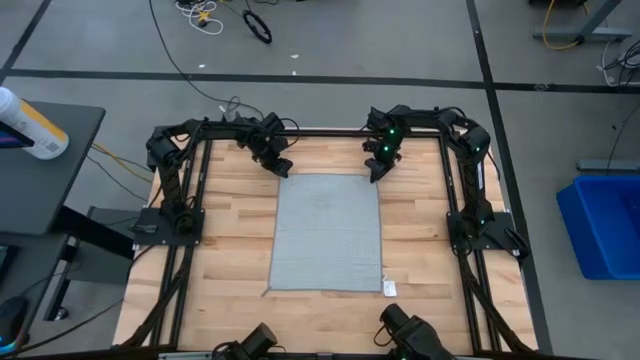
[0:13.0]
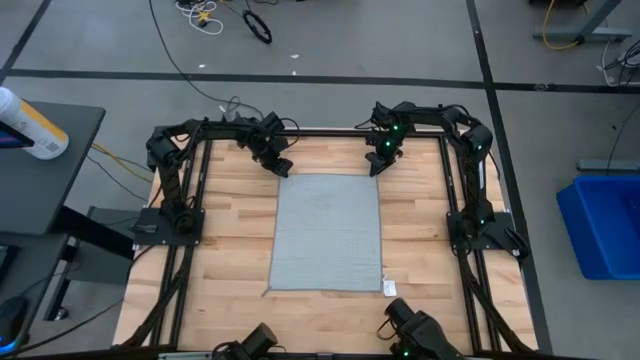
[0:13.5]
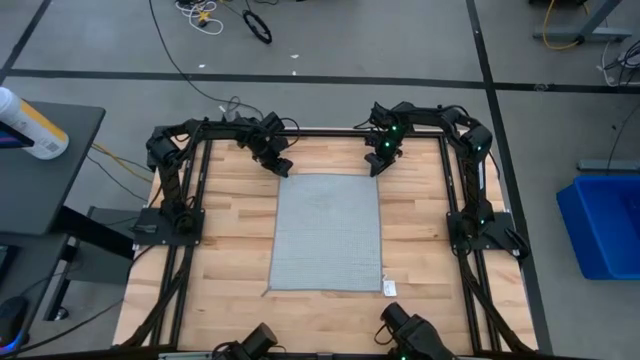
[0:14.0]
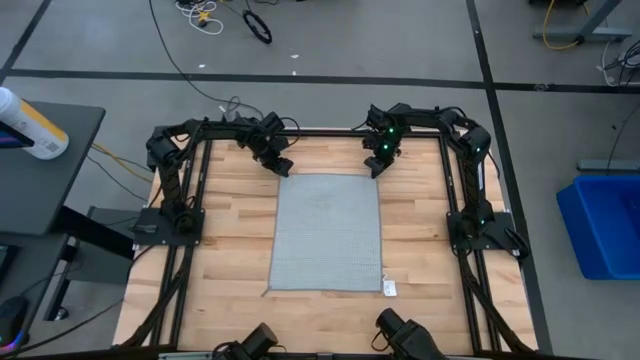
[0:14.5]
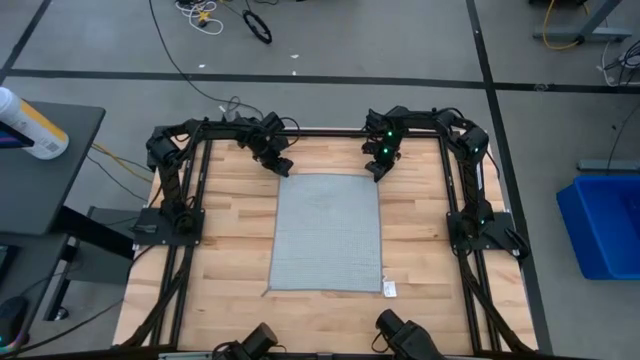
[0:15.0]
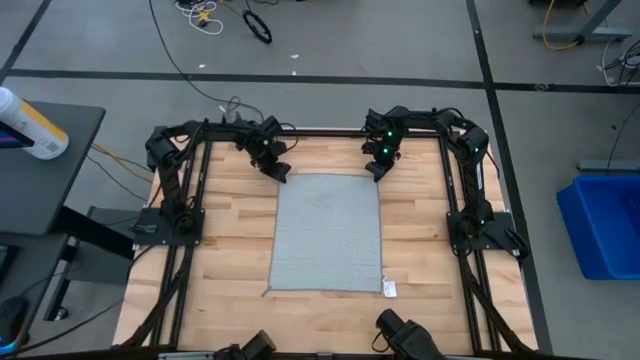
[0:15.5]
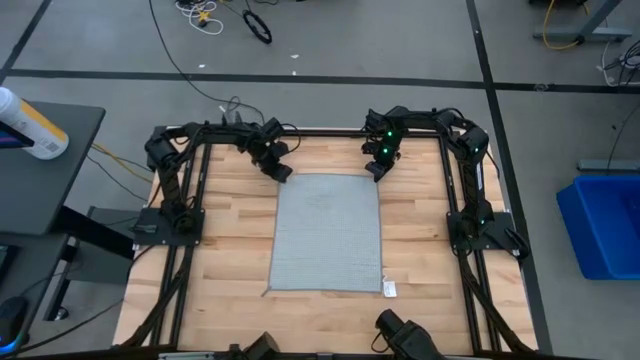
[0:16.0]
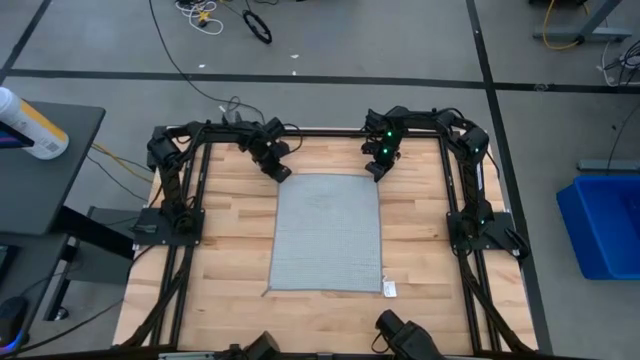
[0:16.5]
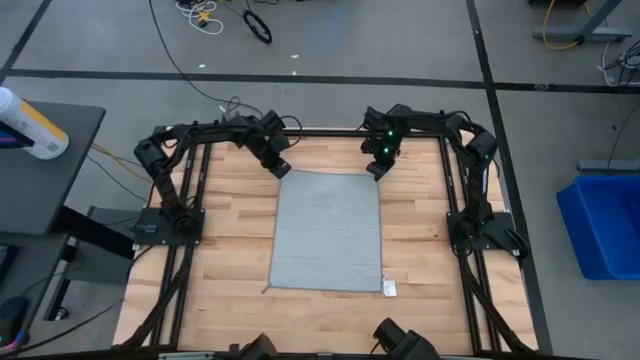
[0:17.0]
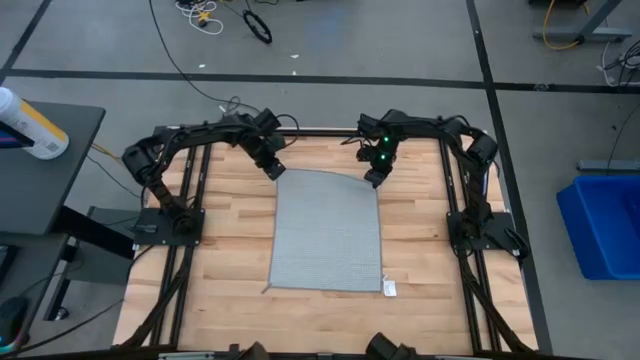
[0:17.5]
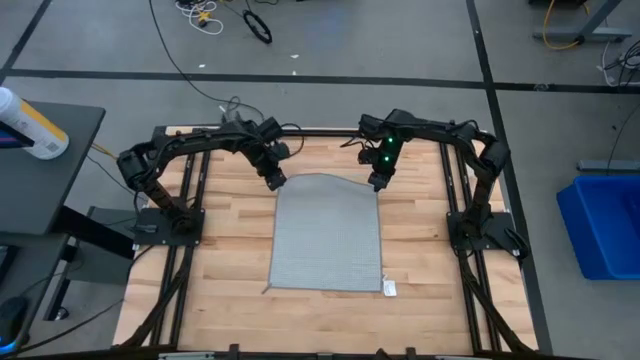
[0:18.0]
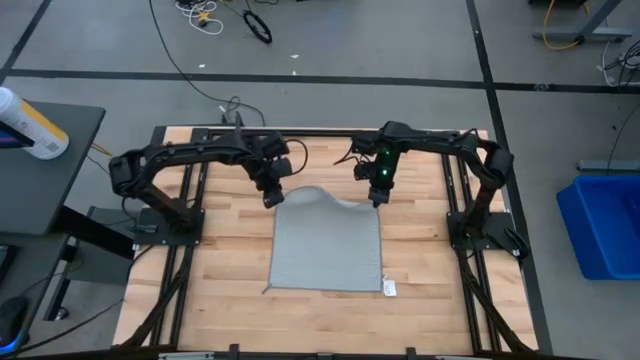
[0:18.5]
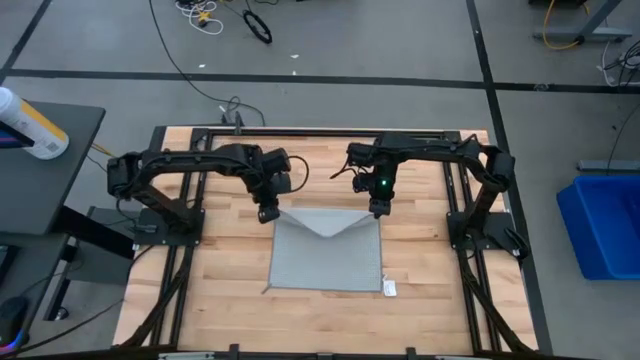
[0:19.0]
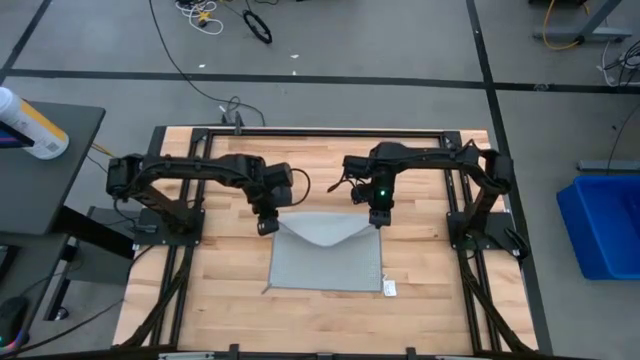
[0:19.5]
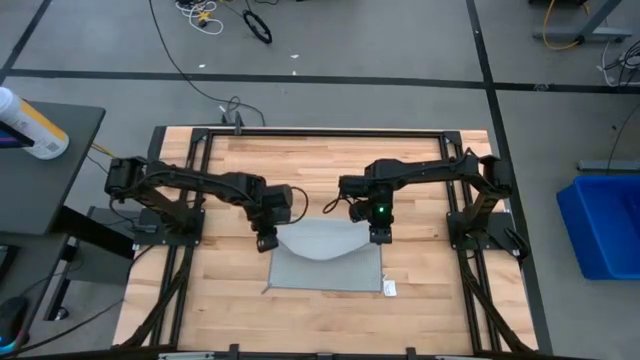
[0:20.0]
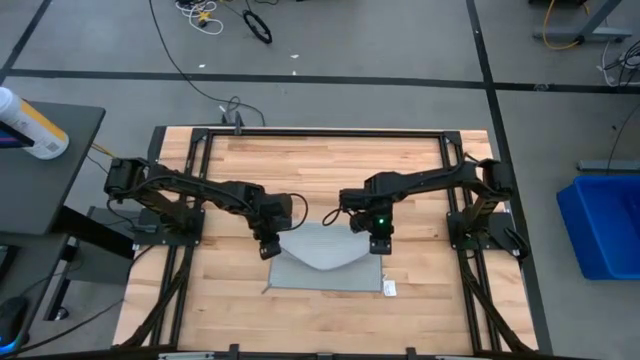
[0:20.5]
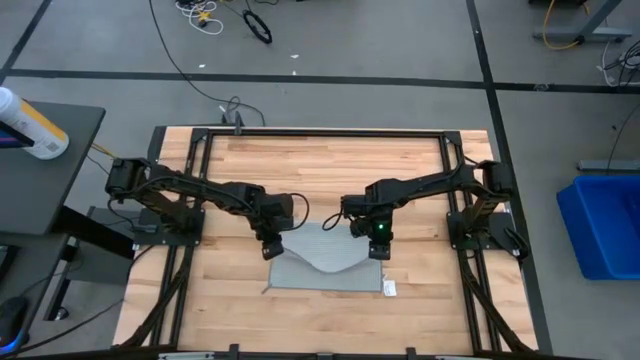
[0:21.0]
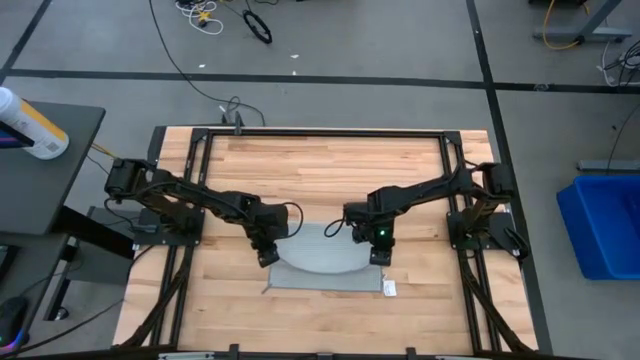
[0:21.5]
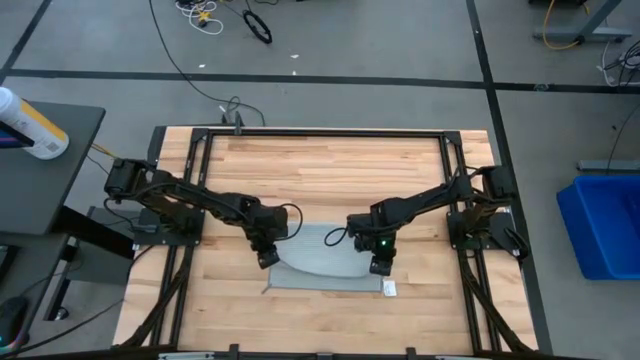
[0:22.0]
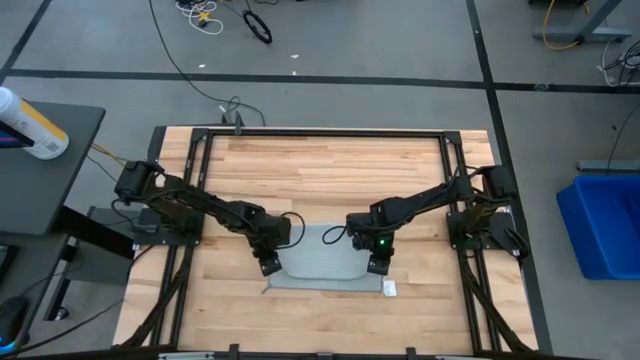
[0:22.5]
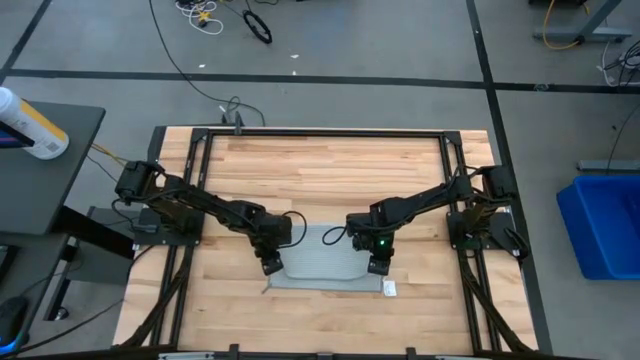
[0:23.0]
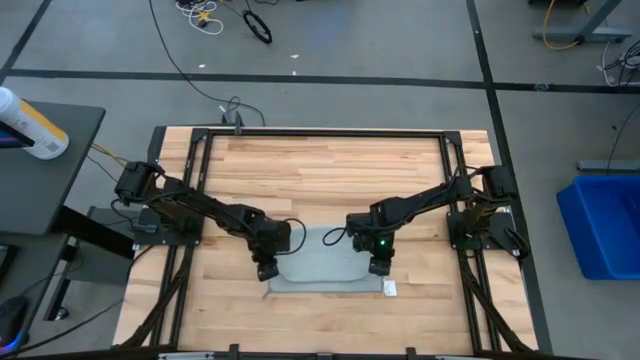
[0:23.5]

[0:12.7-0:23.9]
Task: Fold microfiber towels
Fold the gray microfiber towel

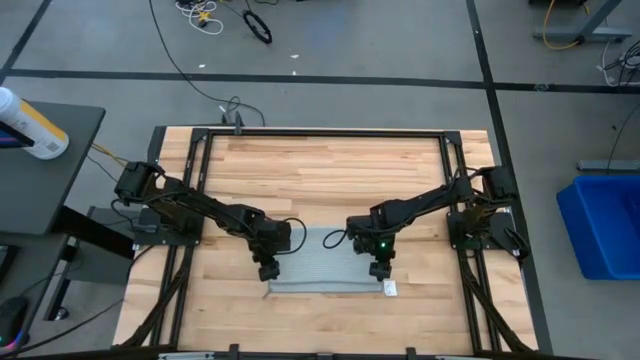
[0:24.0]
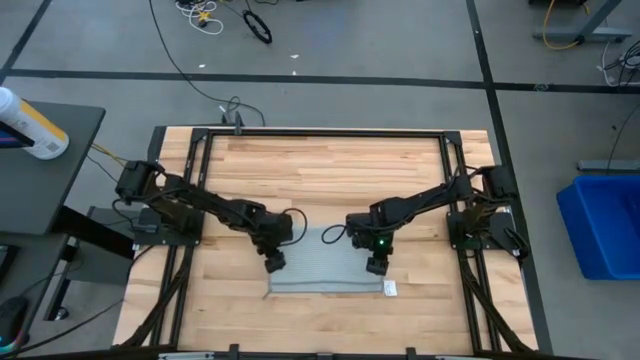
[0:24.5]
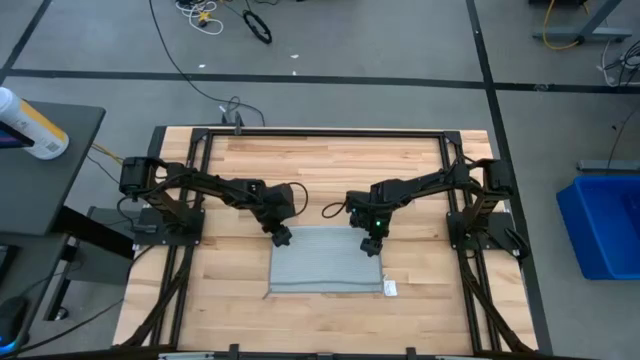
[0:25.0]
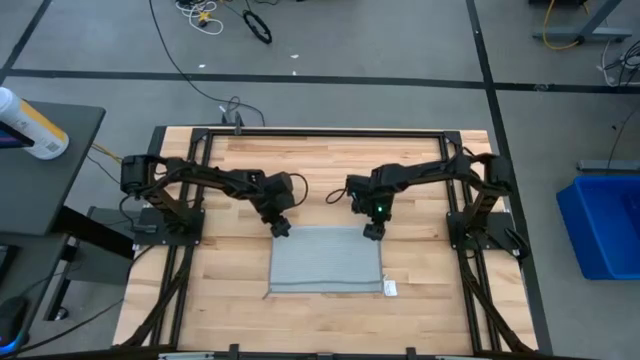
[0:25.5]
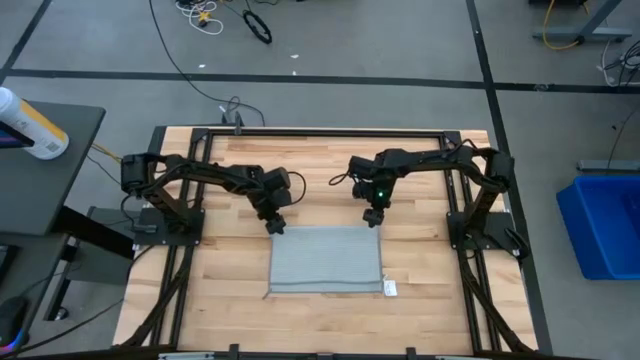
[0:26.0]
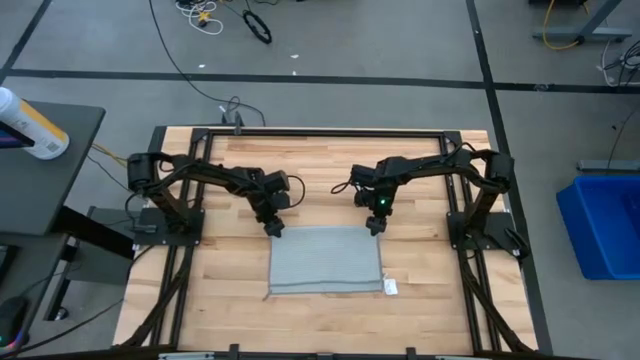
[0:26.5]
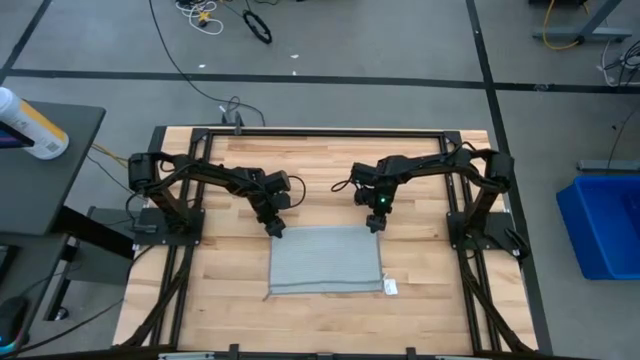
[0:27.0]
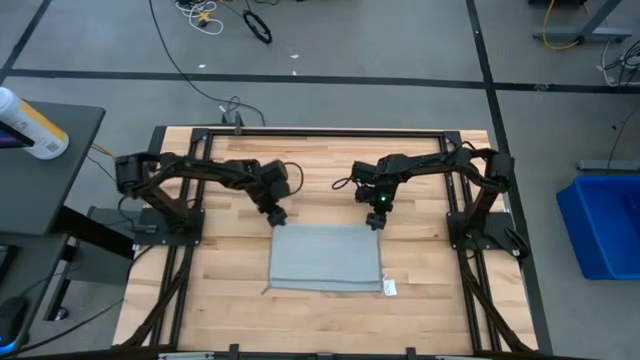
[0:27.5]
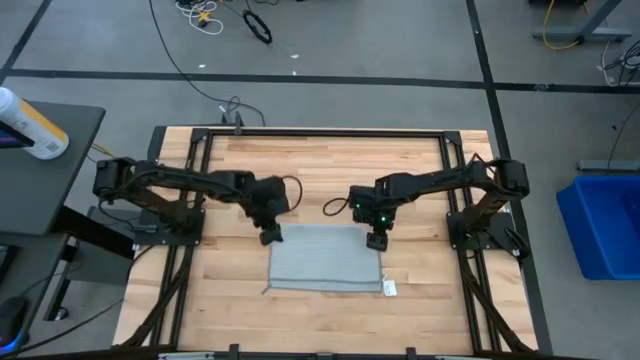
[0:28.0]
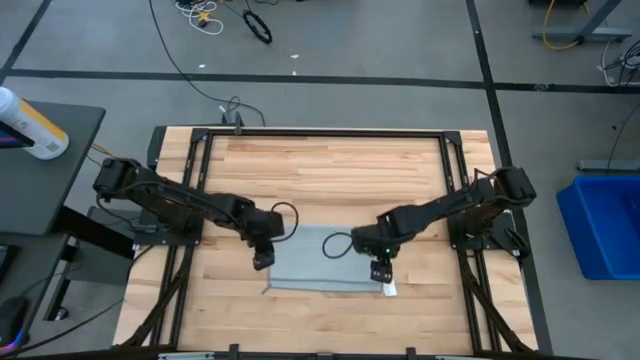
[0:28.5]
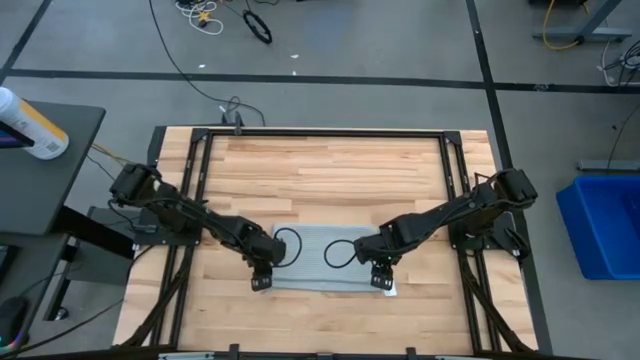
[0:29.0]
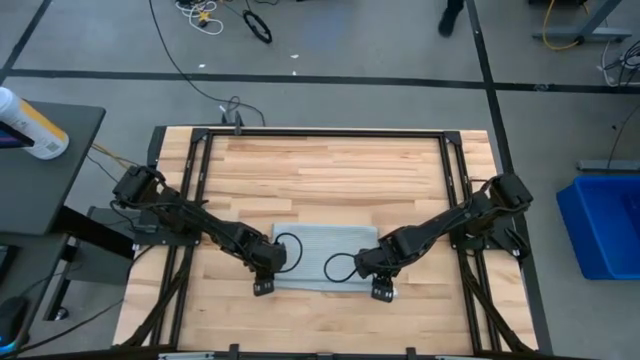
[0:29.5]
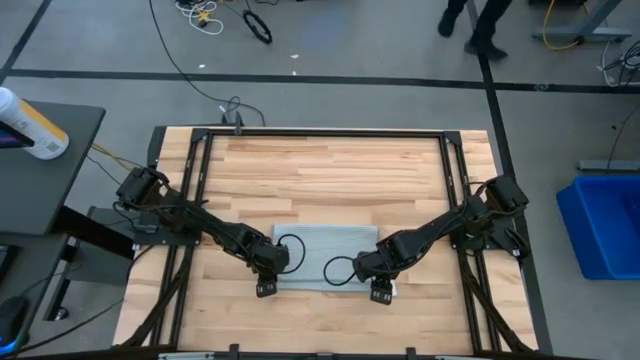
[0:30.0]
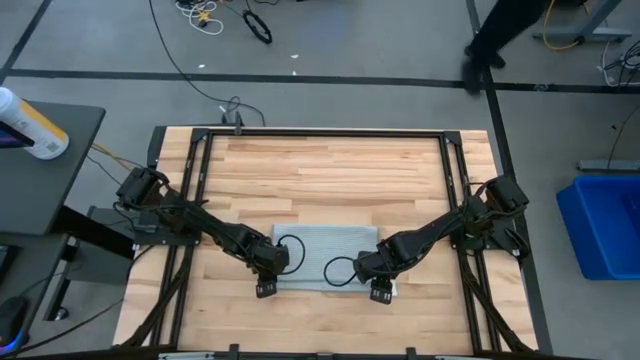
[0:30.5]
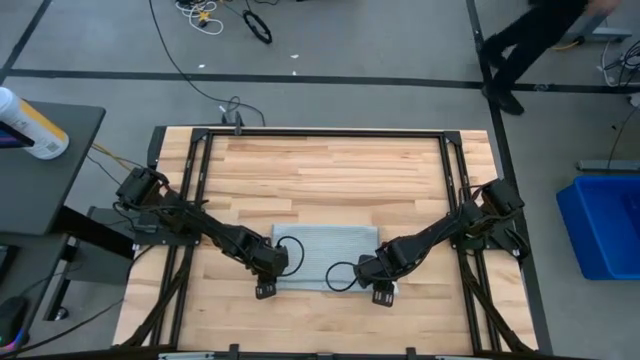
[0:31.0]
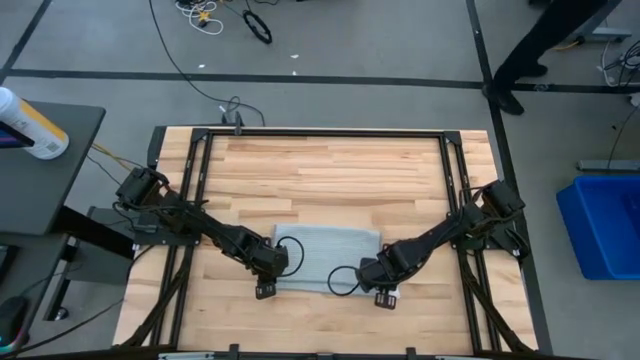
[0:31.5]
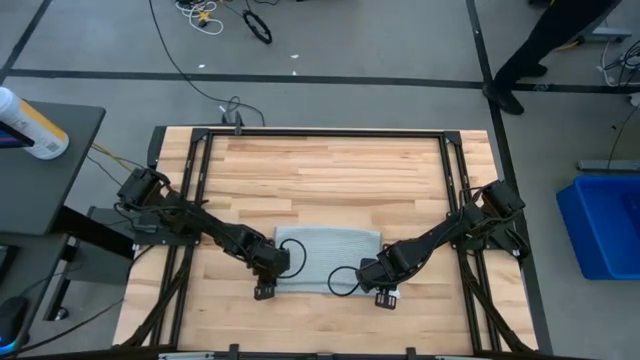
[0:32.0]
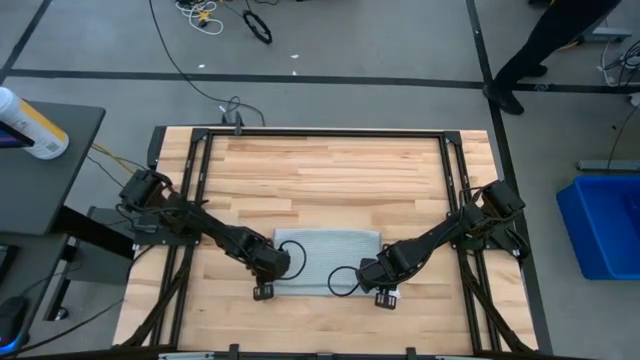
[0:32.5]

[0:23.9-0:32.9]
Fold the gray microfiber towel
